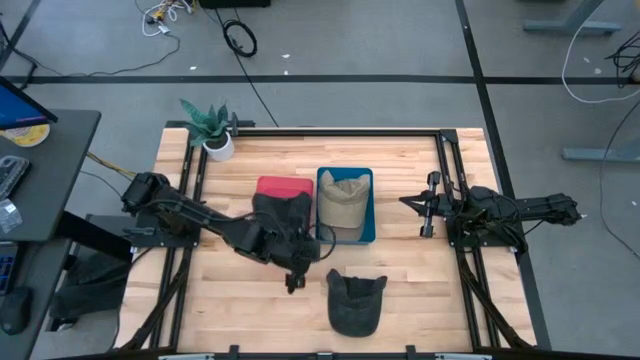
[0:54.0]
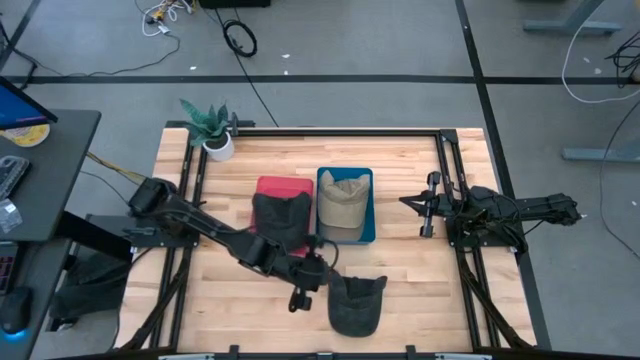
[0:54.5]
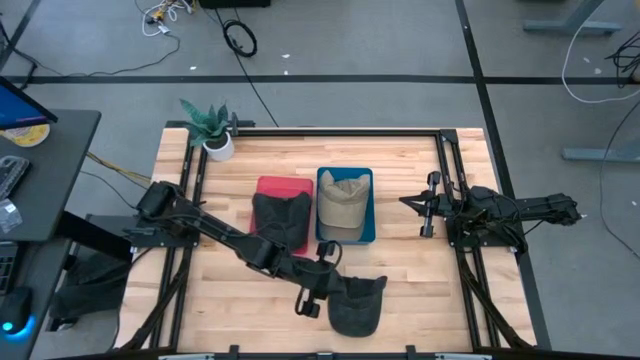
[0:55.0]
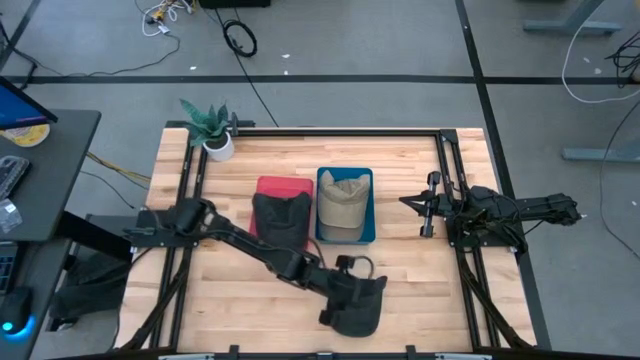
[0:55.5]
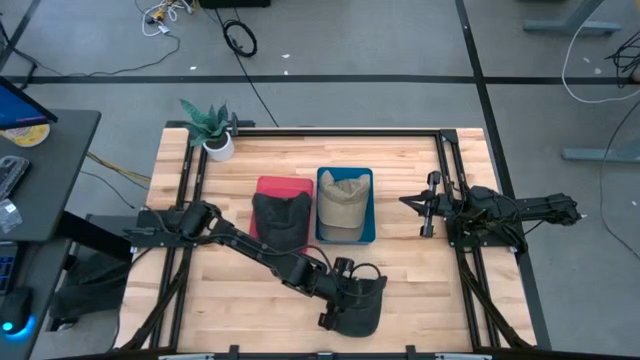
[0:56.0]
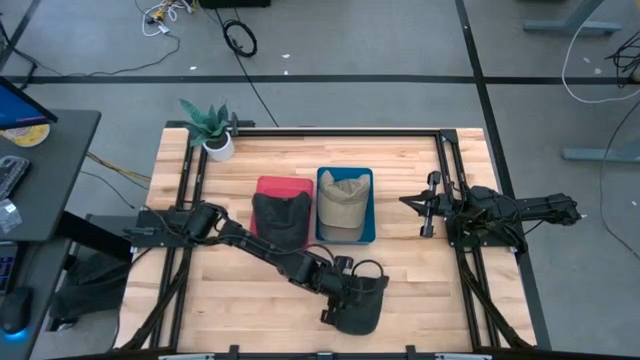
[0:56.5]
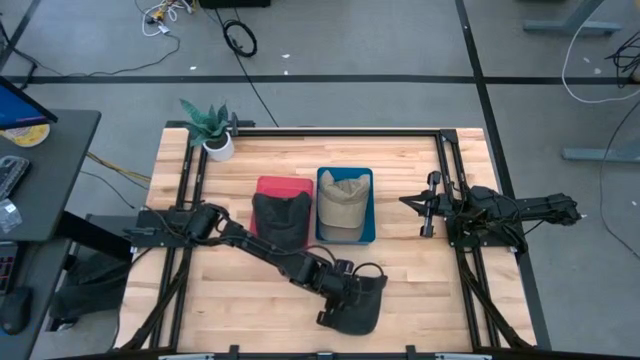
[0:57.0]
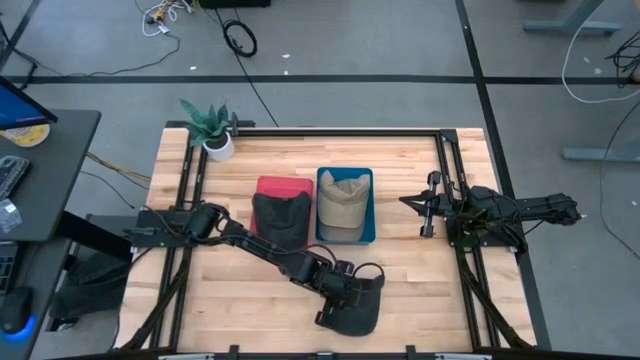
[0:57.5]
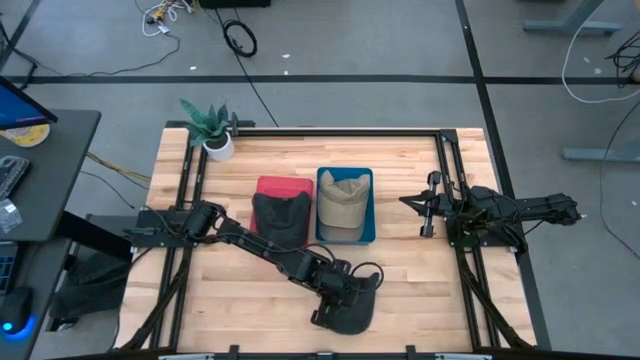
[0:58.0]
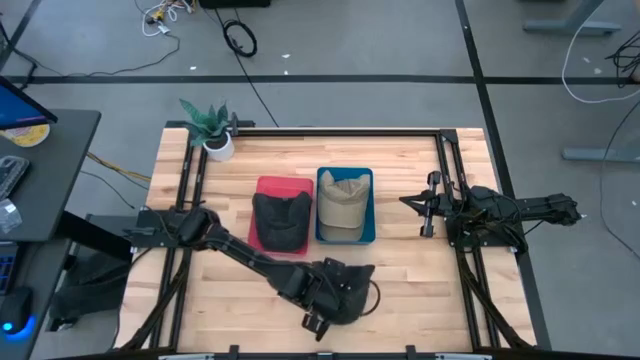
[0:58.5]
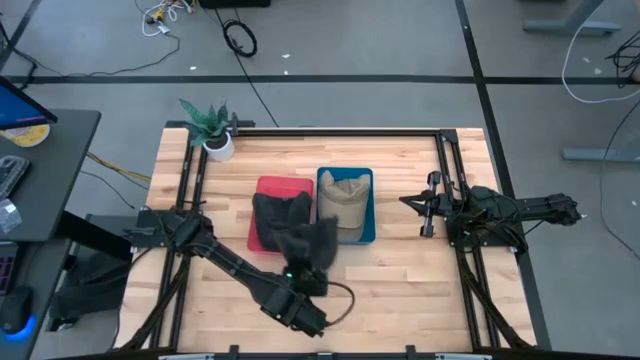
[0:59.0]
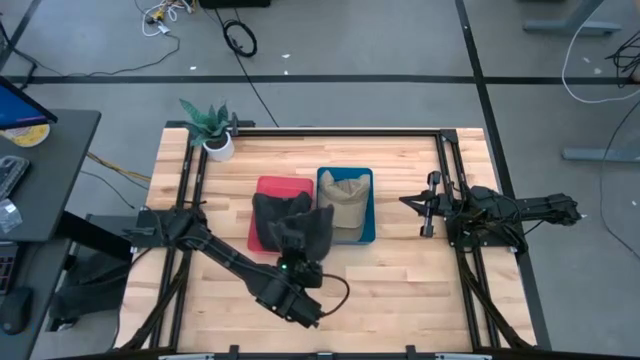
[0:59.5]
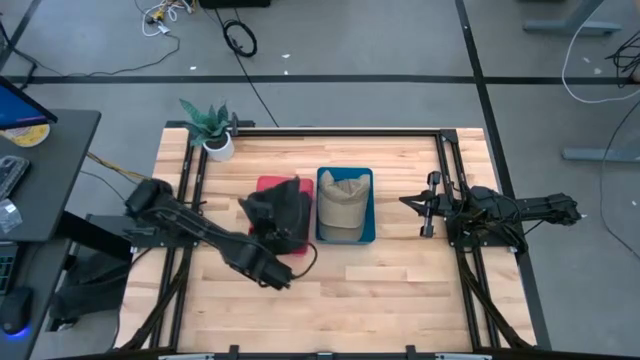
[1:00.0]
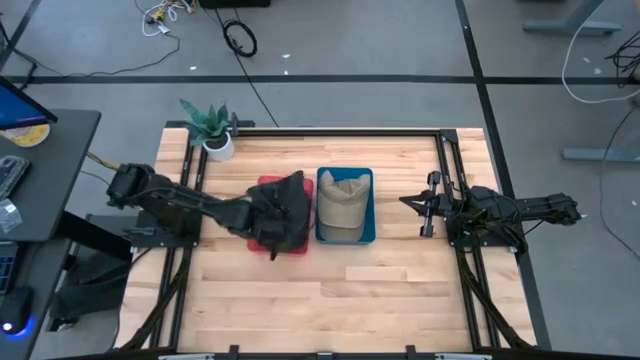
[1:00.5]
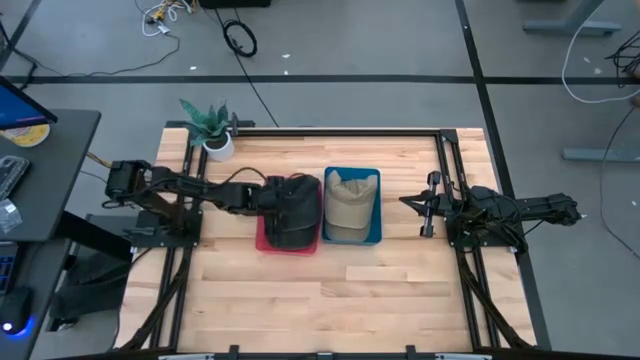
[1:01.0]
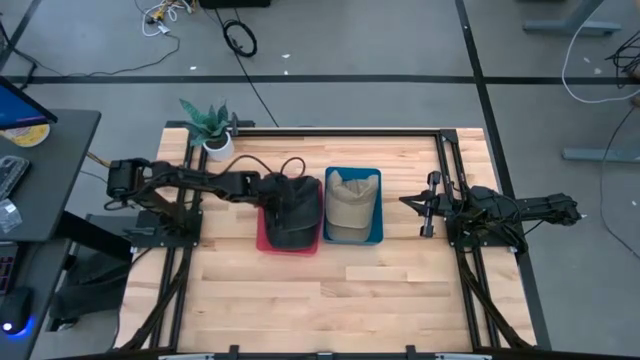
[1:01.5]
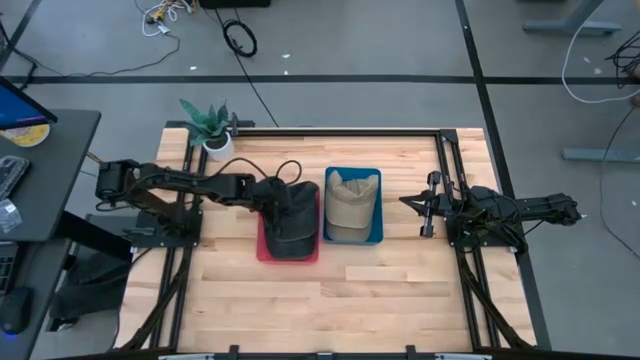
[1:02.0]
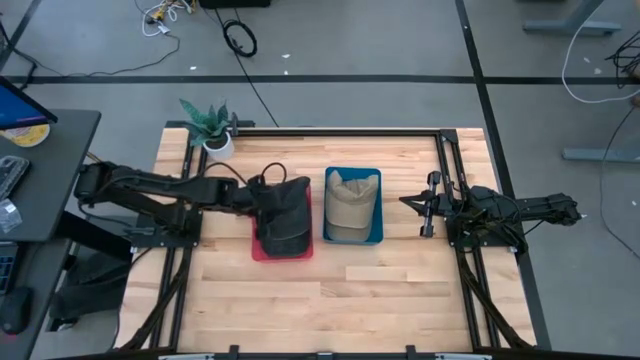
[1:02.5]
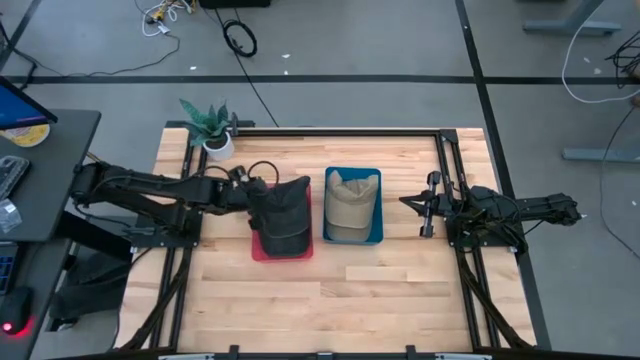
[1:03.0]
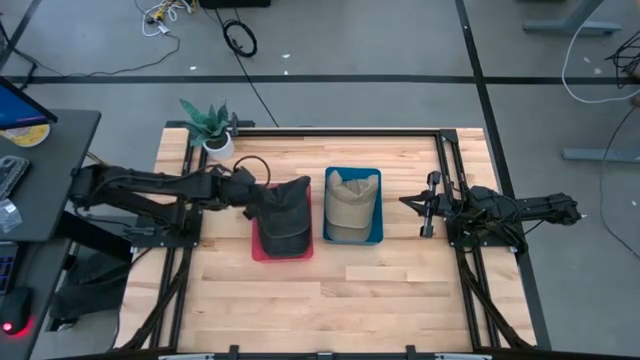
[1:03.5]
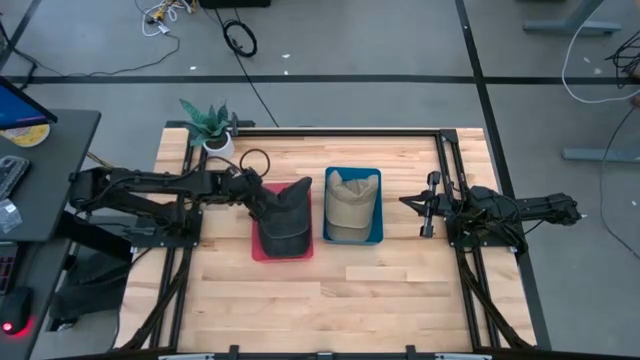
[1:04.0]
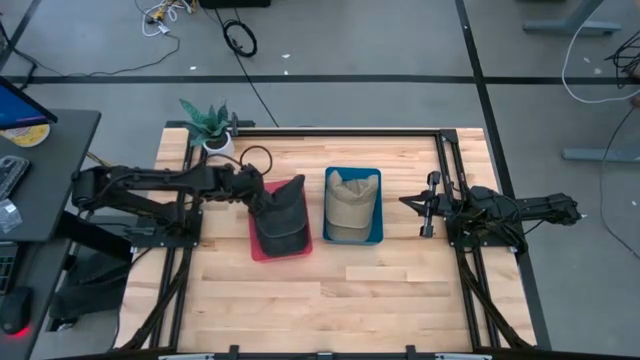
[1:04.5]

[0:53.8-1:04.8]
Task: Pick & Place hat
Put the black cap into the red bin

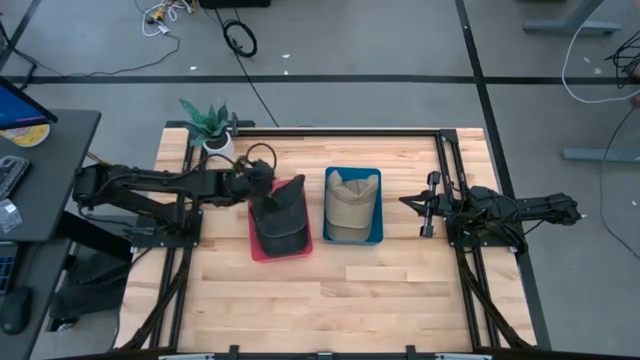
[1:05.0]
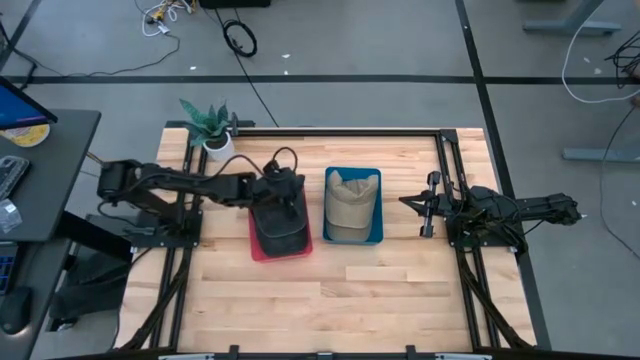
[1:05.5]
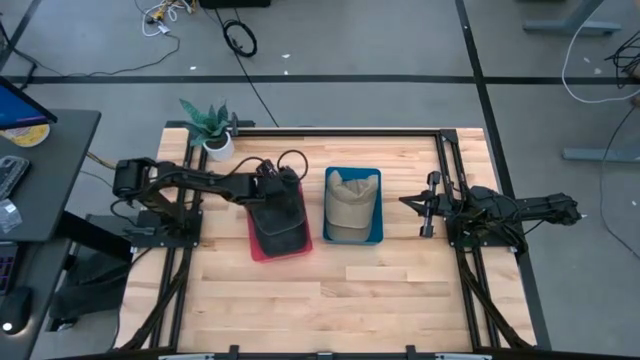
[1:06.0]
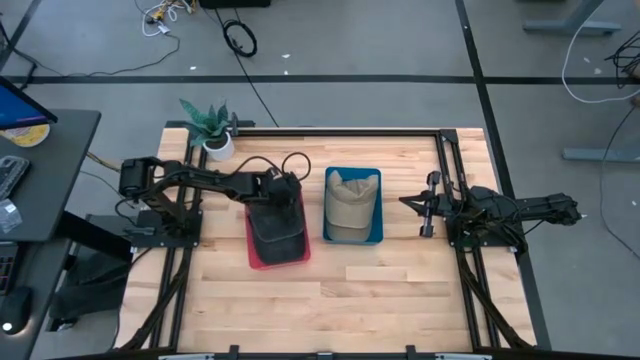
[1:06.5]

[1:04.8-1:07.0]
Adjust the black cap

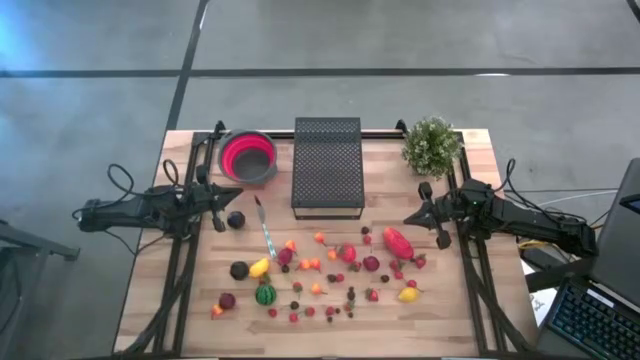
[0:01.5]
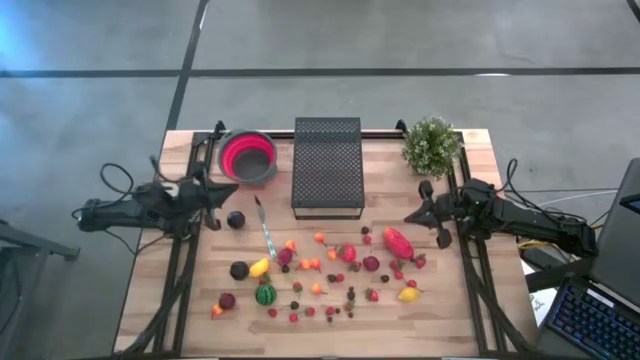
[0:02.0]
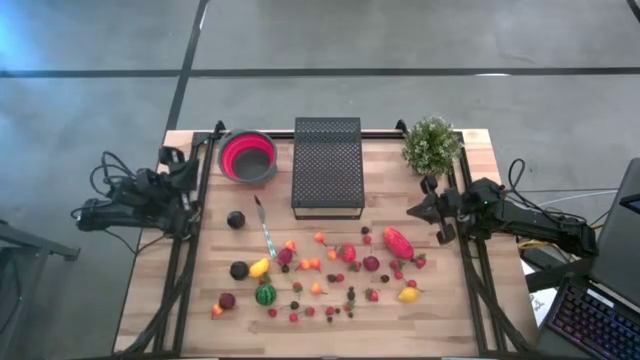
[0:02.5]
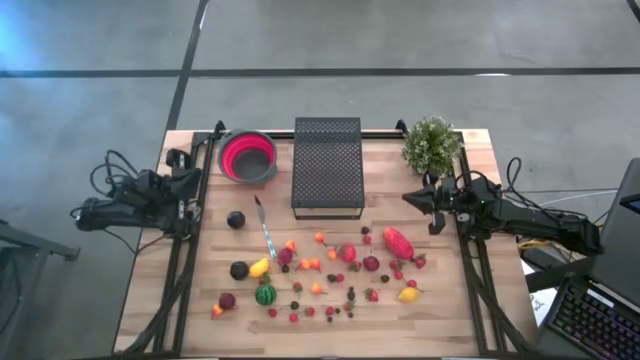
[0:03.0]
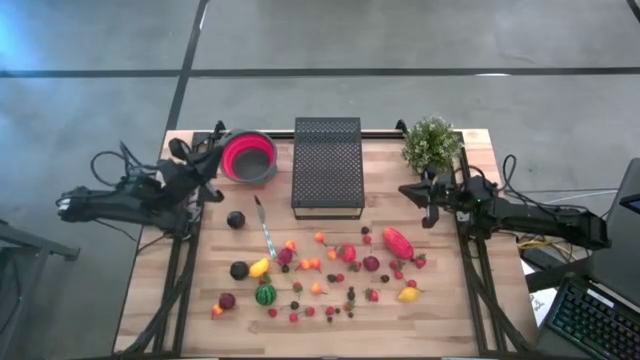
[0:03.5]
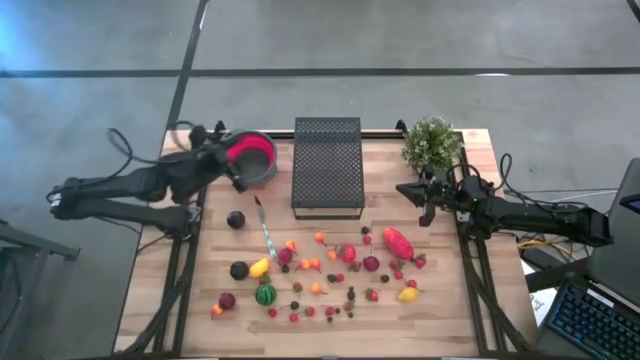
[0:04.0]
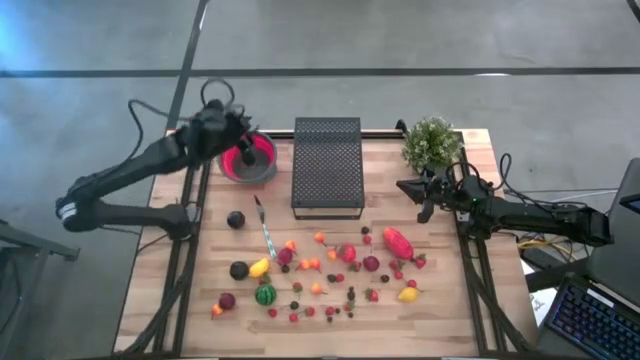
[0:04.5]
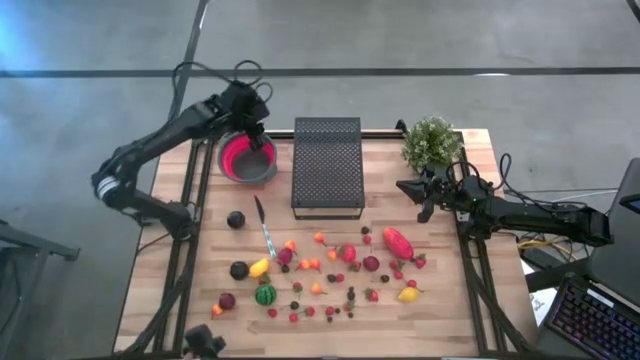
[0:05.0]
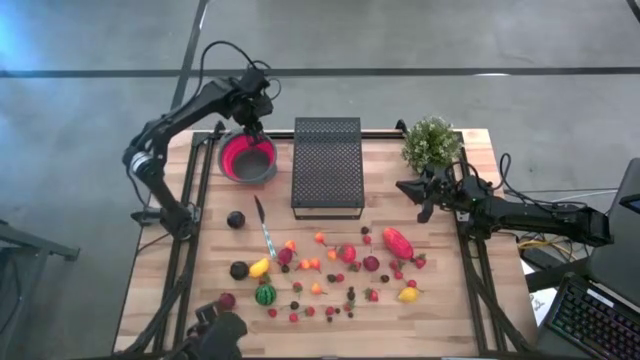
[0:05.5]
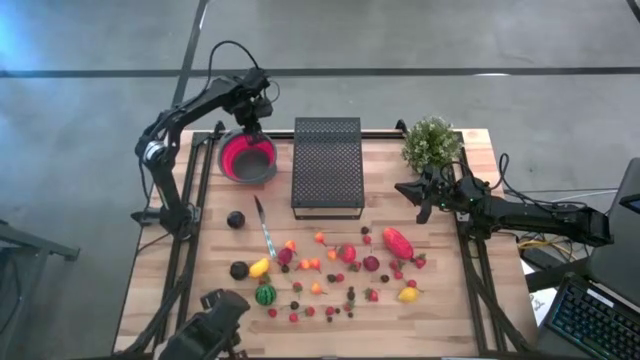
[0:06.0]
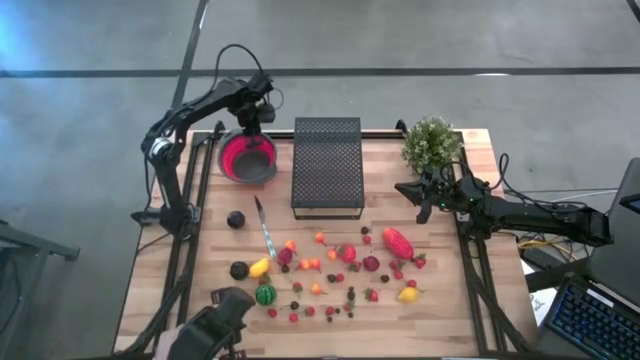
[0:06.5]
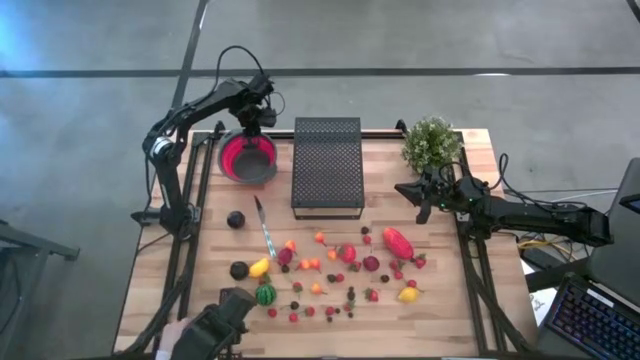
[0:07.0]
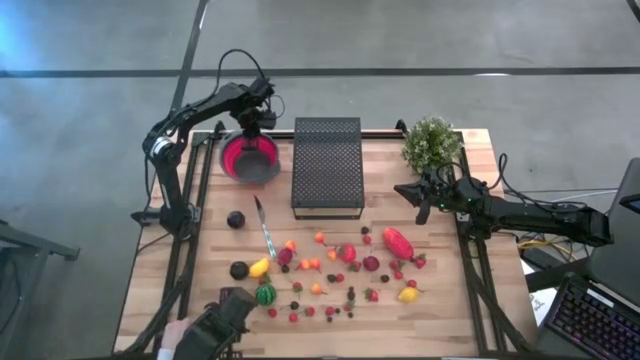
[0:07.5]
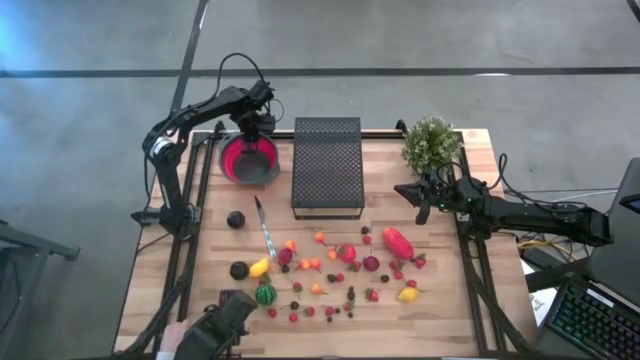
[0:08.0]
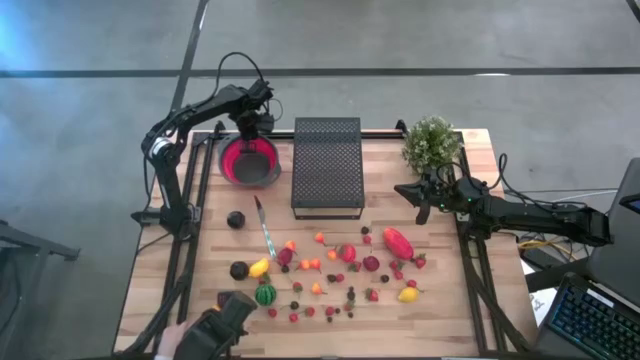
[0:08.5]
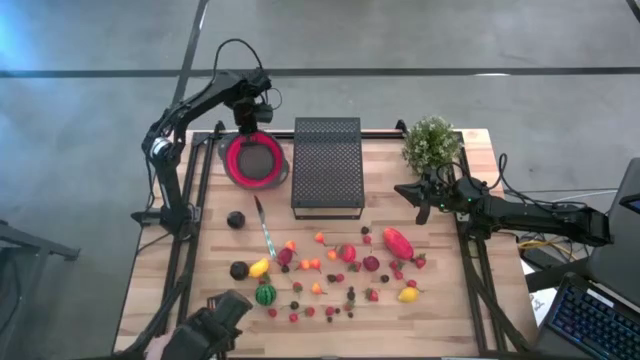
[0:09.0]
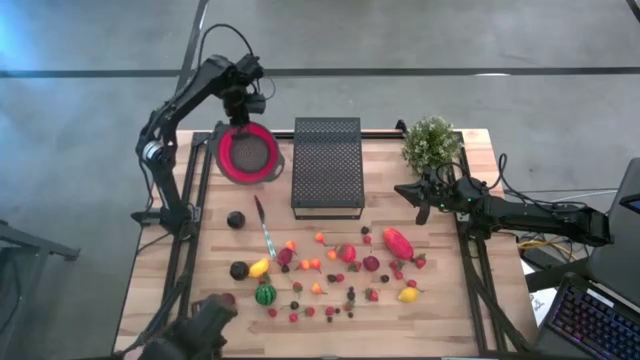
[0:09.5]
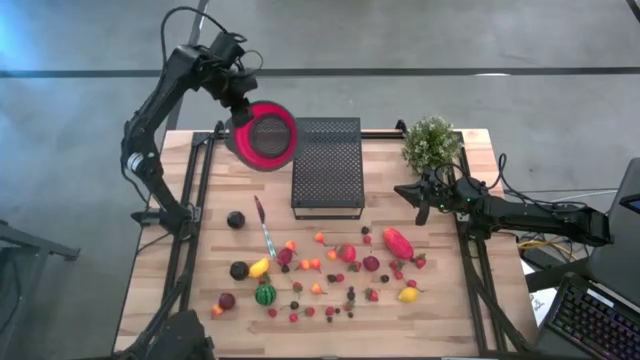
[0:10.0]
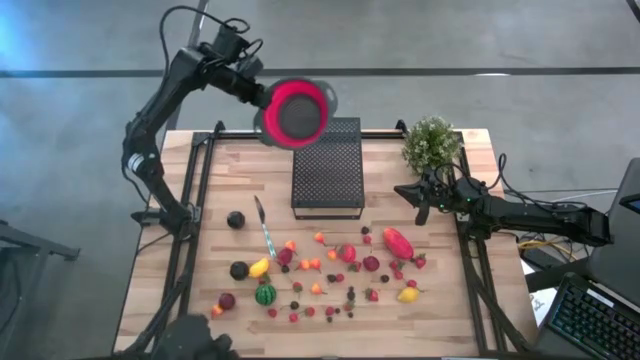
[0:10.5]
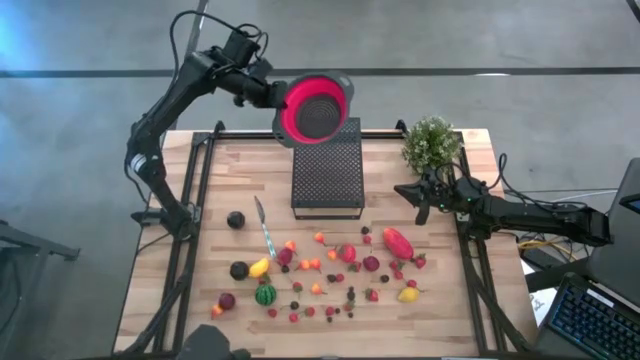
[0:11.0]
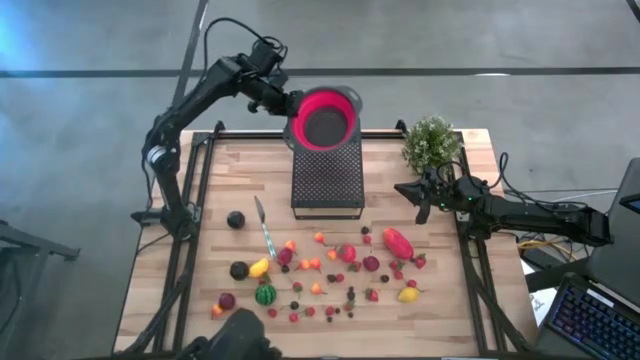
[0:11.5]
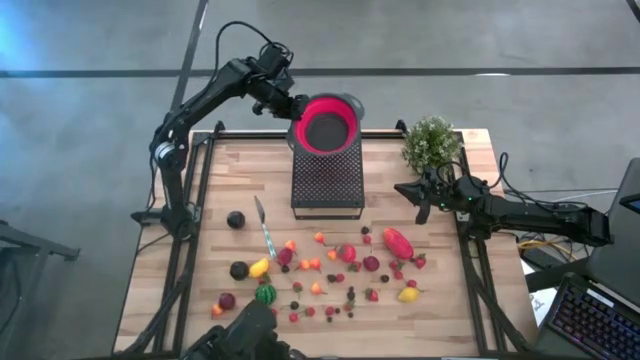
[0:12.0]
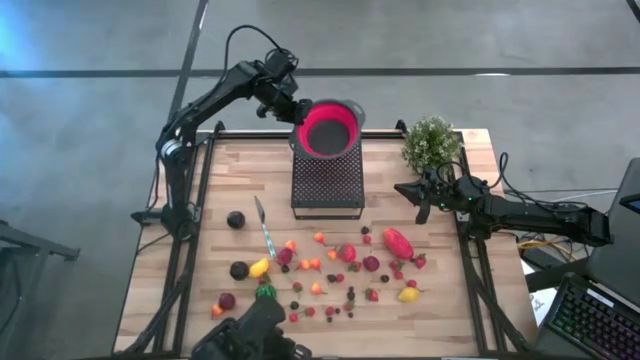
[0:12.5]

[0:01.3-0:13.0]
Task: Pick & Place Fruit
Put the strainer bowl on the shelf
